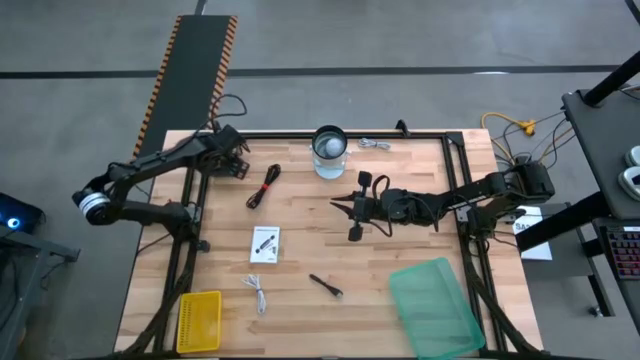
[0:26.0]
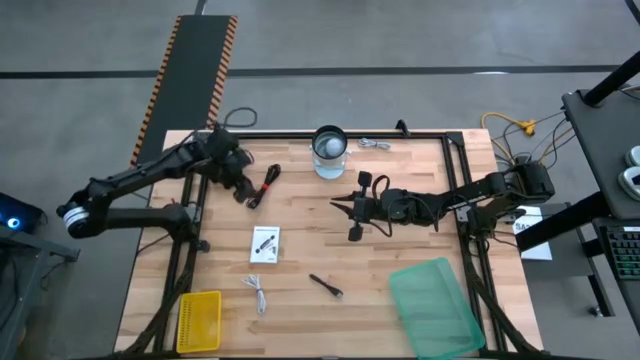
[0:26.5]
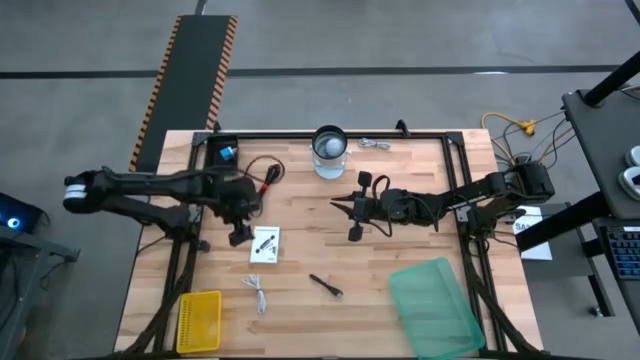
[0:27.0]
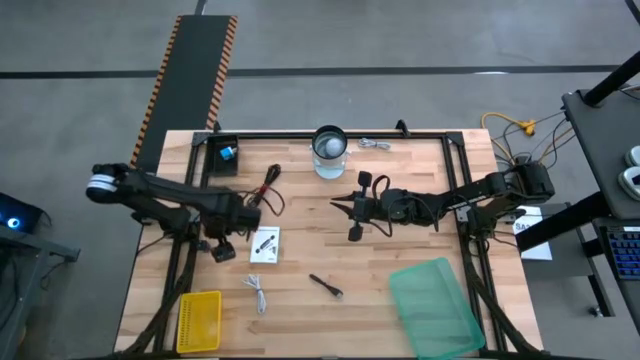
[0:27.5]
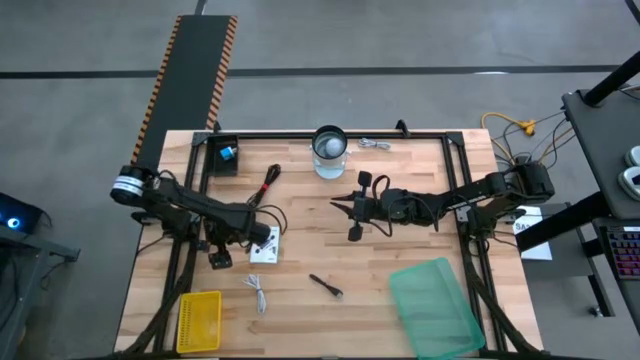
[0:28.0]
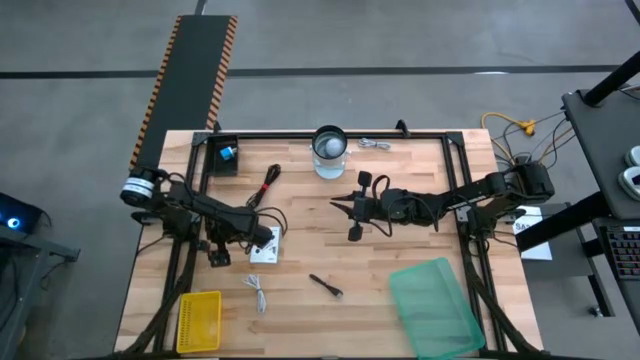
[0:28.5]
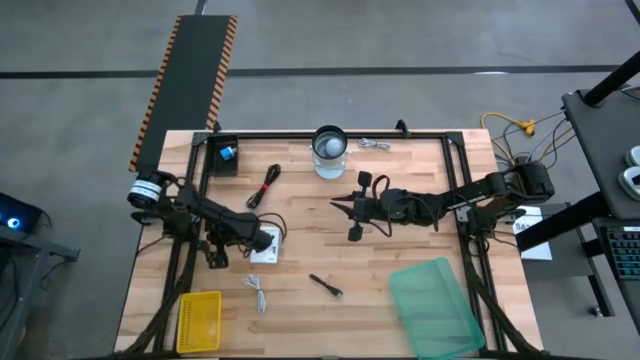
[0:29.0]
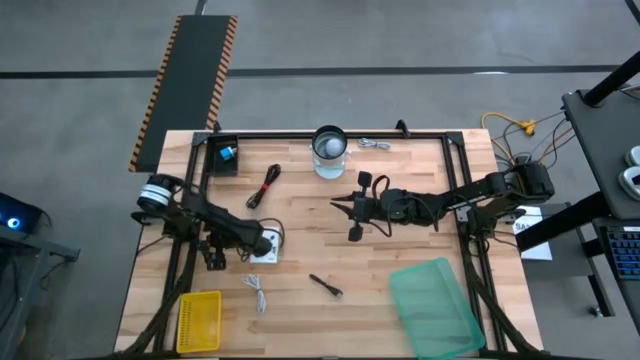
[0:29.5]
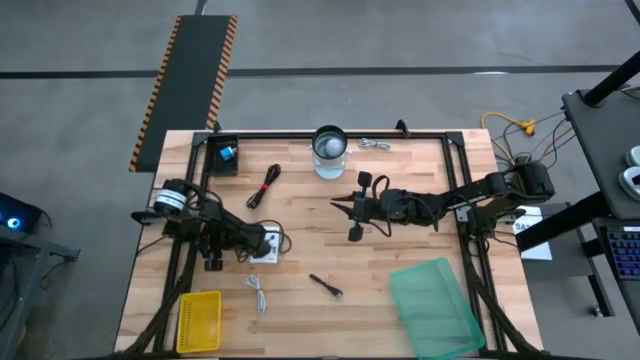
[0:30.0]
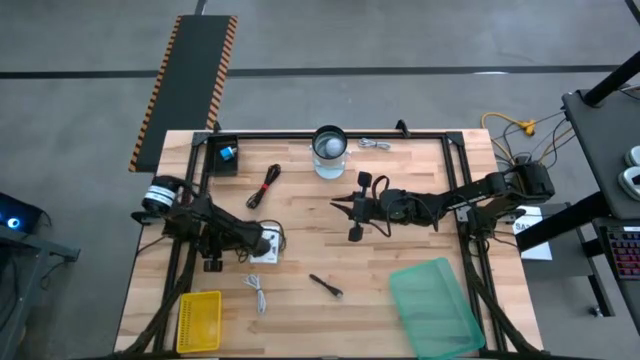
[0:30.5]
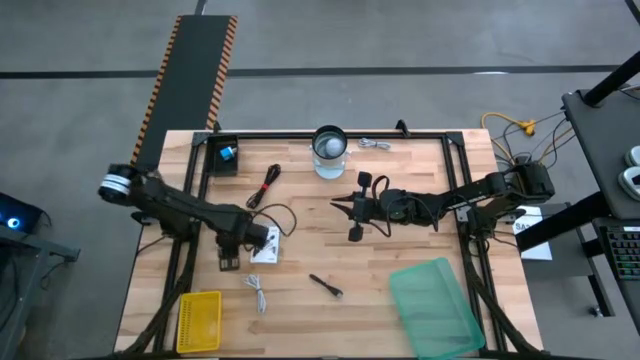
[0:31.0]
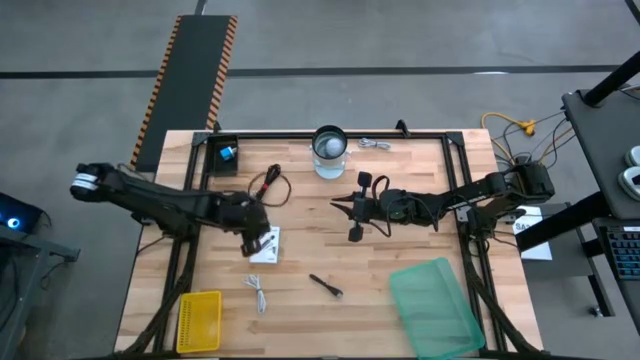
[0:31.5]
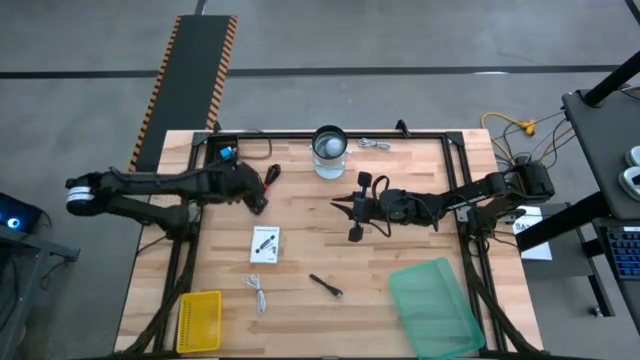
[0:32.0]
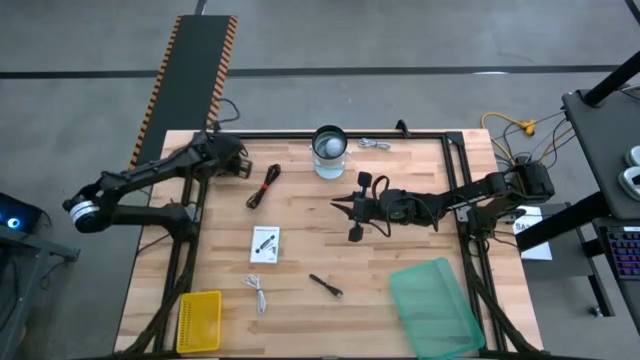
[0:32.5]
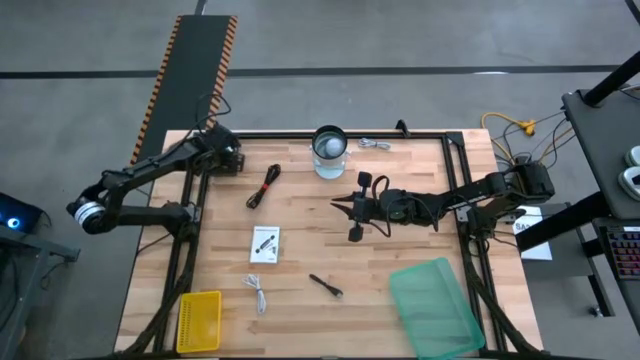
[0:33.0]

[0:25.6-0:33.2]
Task: Pick and place items into bin
Put the black charger adapter into the black bin

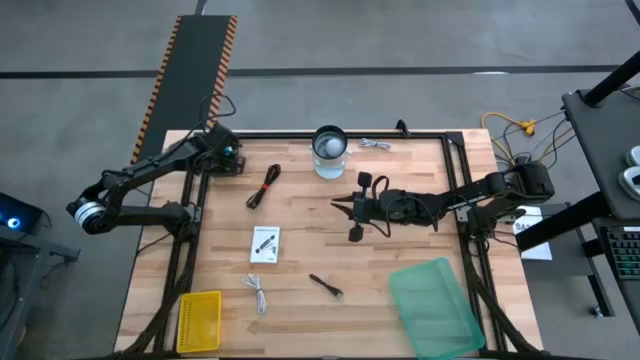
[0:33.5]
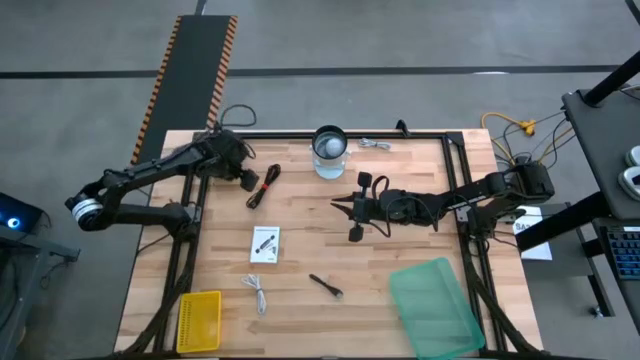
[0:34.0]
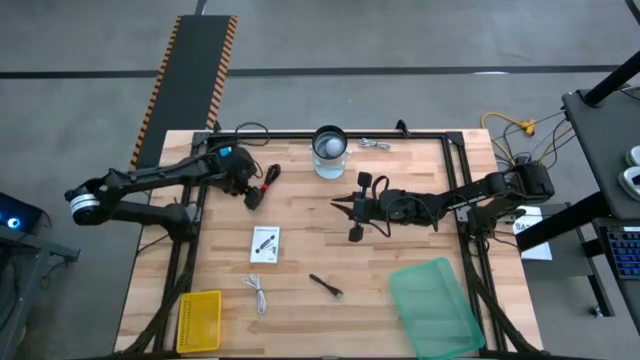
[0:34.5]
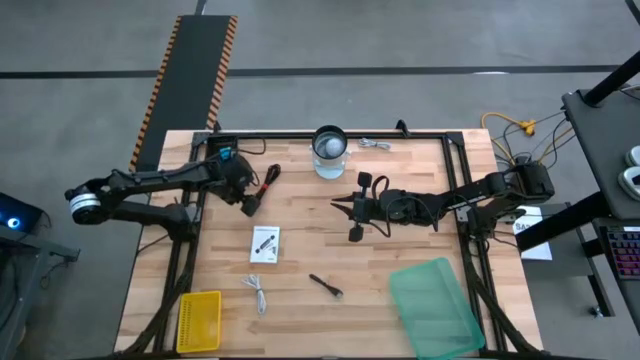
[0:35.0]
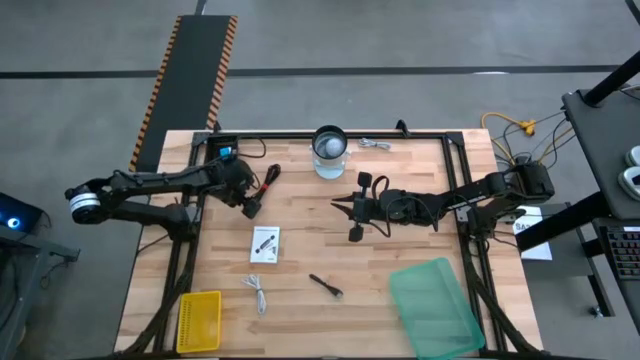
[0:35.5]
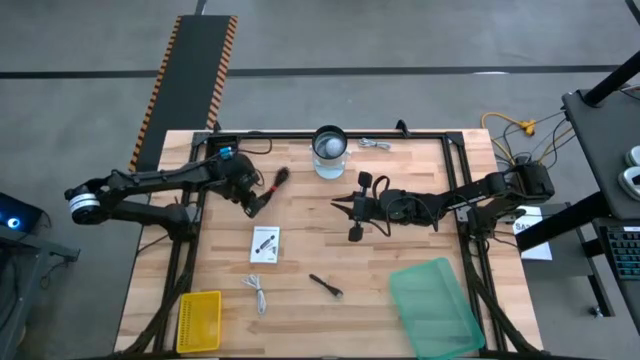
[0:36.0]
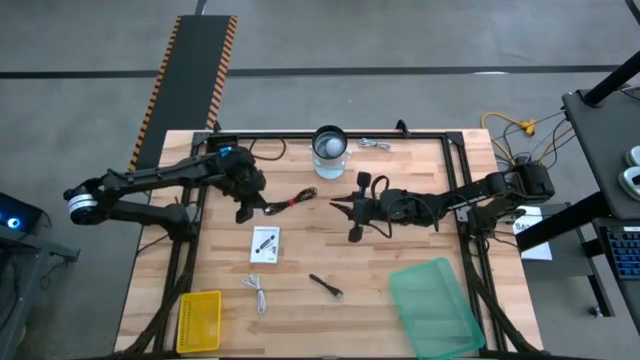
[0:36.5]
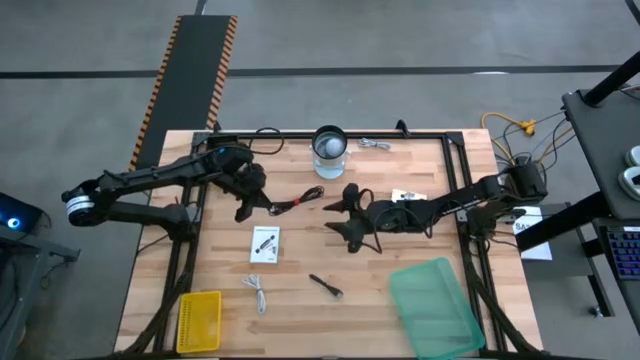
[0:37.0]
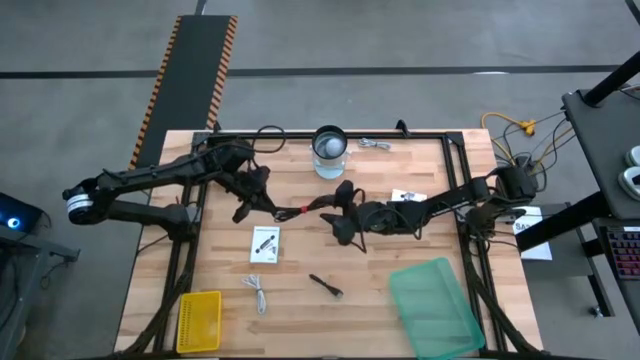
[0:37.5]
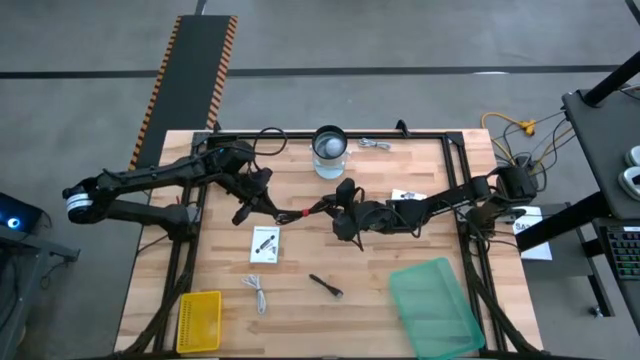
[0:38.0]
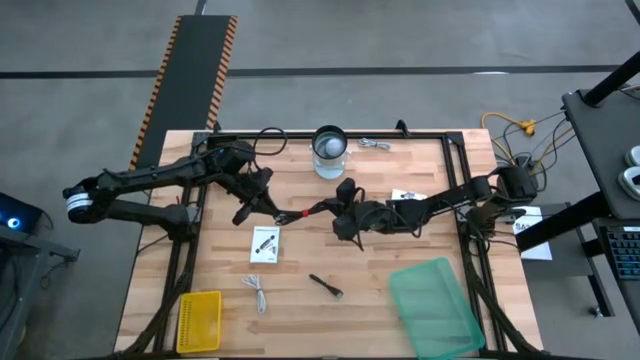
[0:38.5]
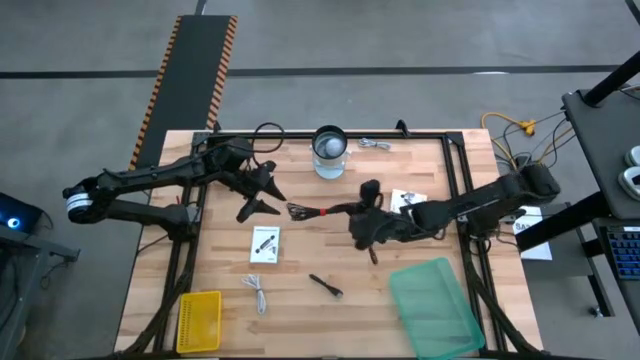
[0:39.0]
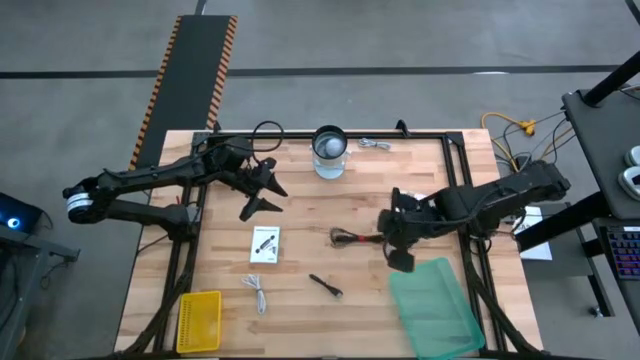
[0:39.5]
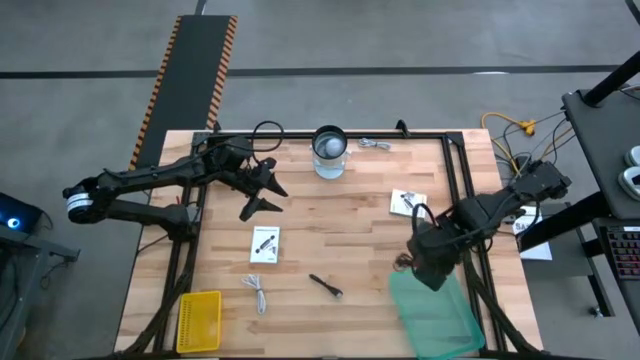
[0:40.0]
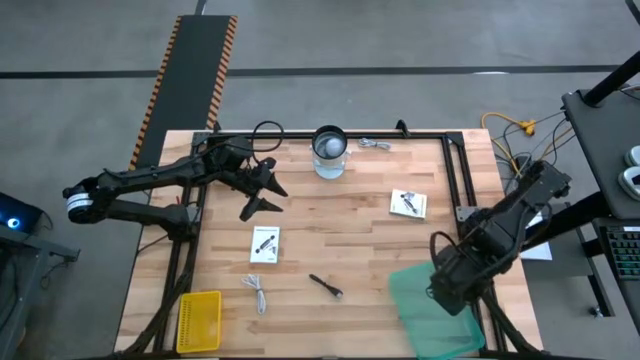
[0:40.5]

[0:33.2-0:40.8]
Put the top black usb cable into the green bin

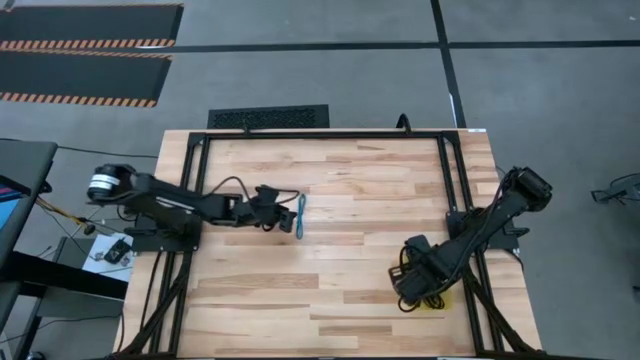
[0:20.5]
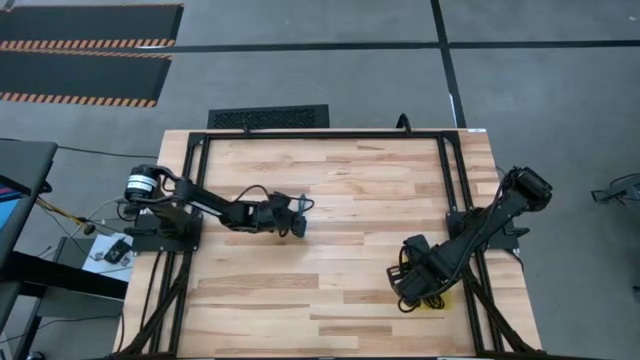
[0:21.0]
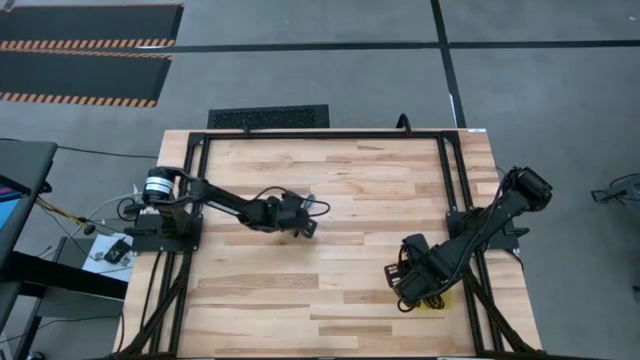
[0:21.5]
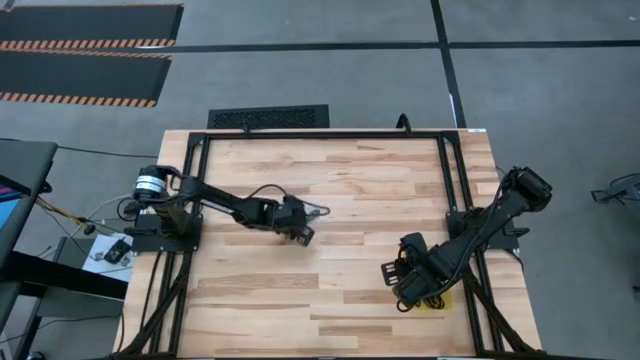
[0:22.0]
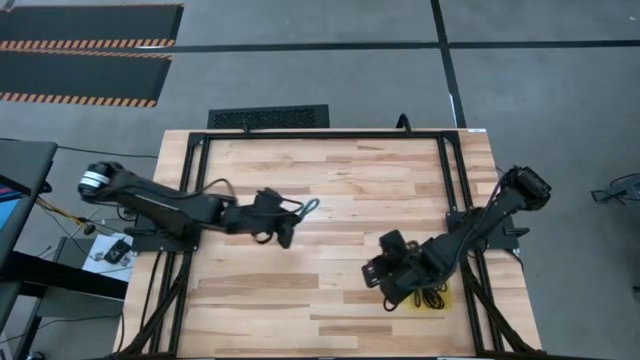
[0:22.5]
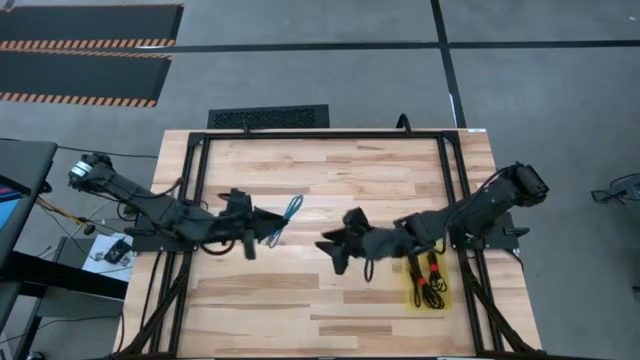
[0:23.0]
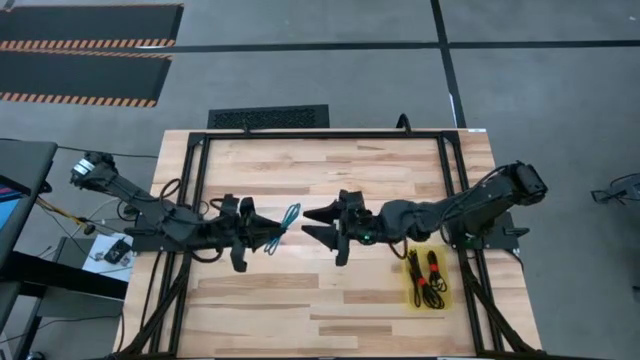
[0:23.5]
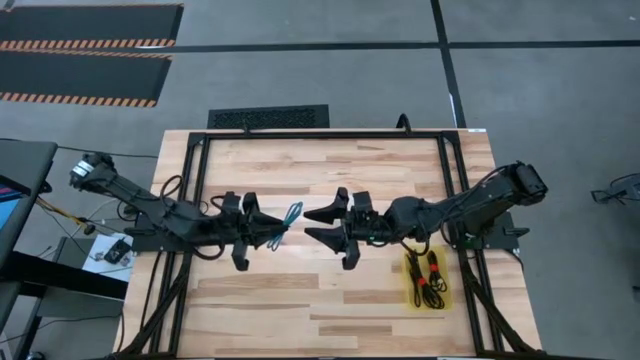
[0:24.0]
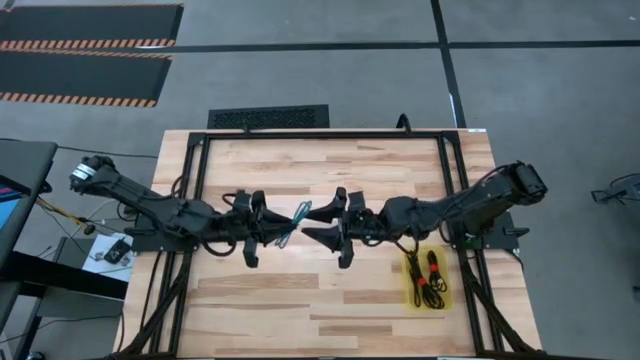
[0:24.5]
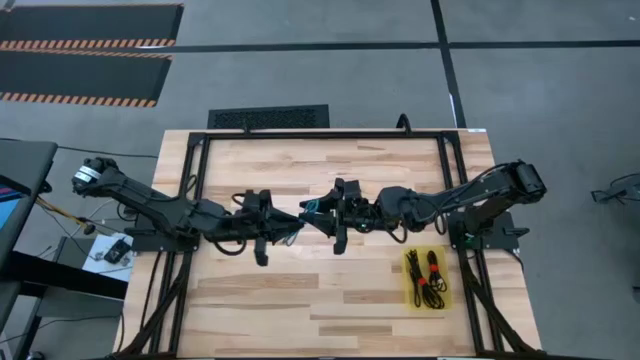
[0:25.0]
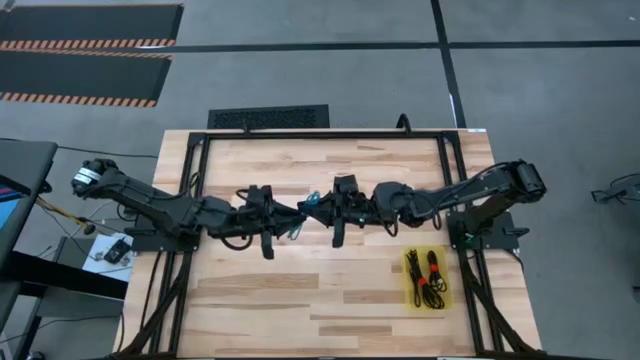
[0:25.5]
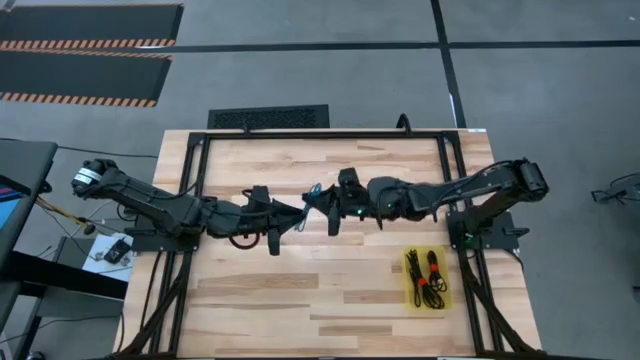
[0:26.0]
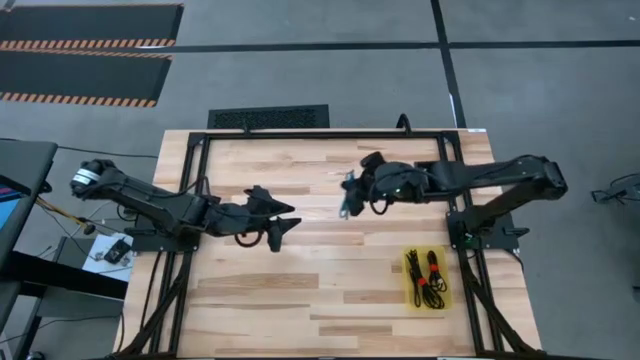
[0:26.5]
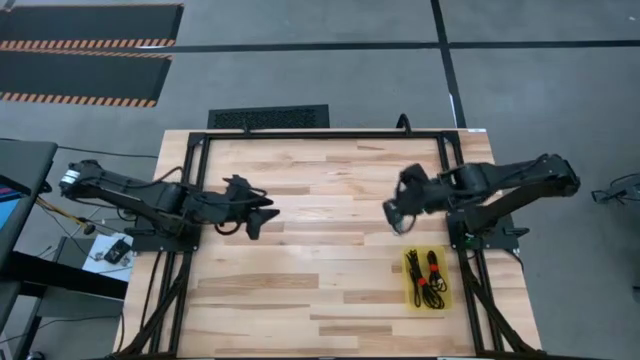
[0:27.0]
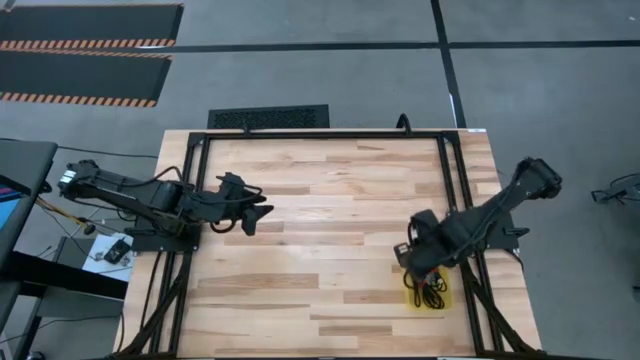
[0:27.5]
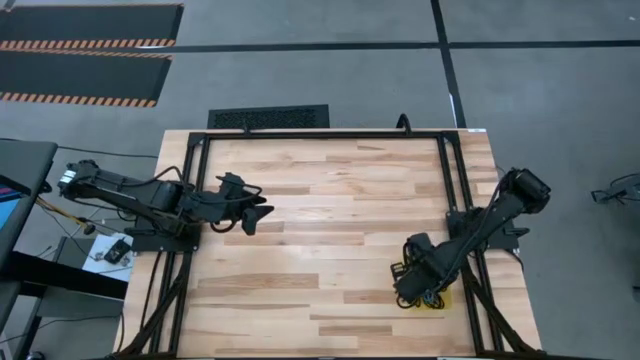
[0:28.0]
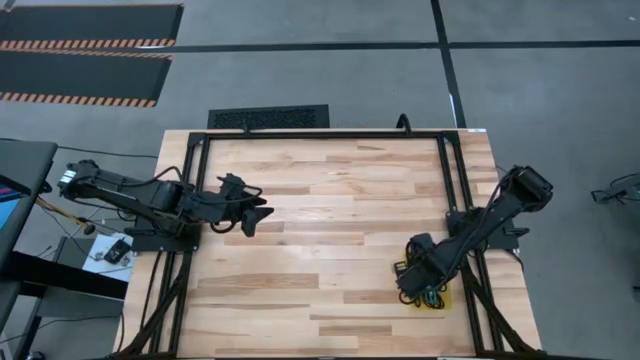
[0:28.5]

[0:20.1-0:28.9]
Task: Pick and place USB-C Cables
Put the blue charger cable into the yellow bin
